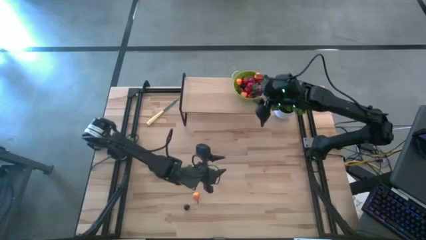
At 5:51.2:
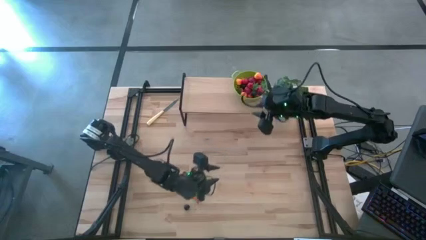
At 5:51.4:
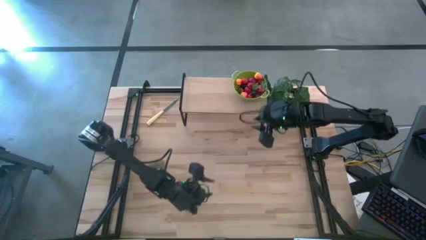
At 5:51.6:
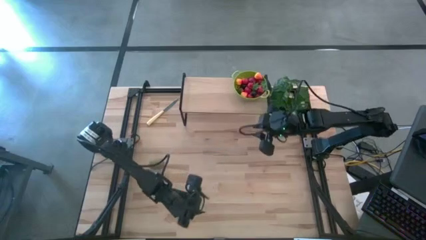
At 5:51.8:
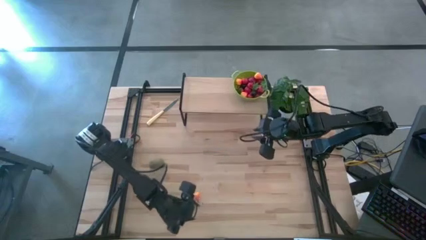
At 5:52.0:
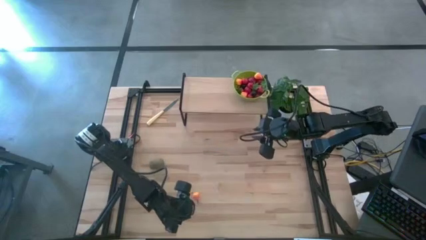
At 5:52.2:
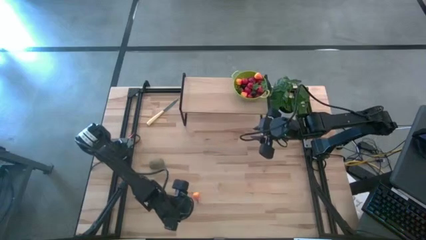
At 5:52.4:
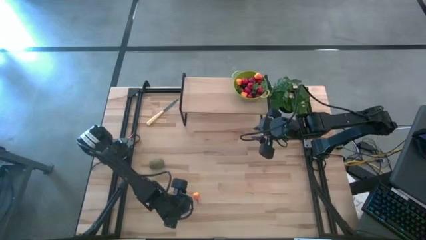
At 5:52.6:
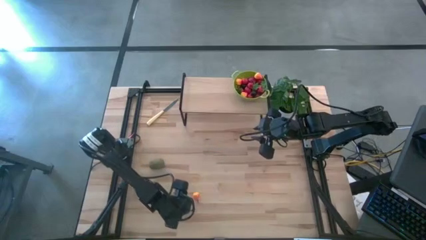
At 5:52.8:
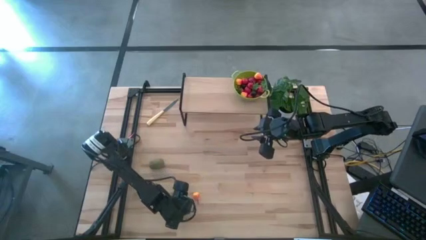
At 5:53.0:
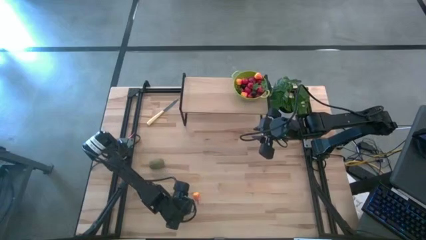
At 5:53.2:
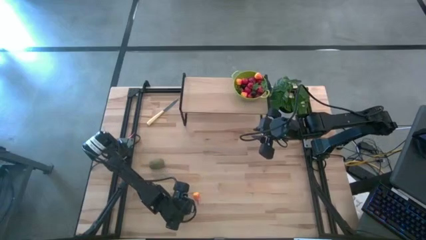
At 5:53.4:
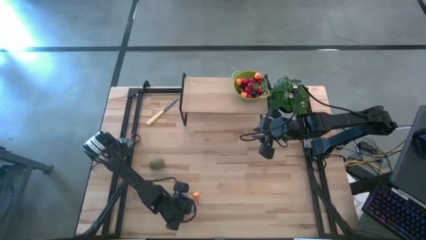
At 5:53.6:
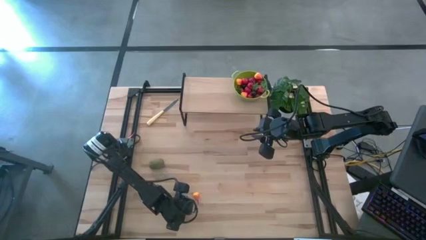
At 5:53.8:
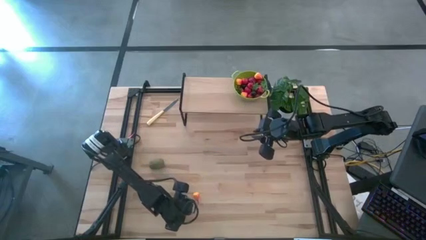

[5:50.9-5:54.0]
Task: Build produce basket
Put the black cherry into the green basket

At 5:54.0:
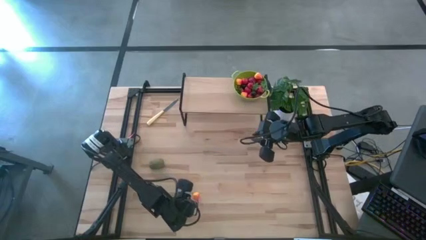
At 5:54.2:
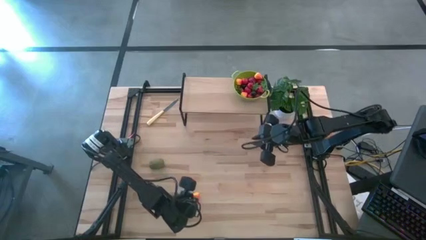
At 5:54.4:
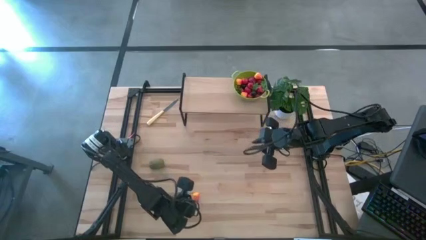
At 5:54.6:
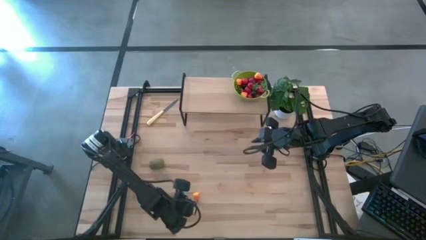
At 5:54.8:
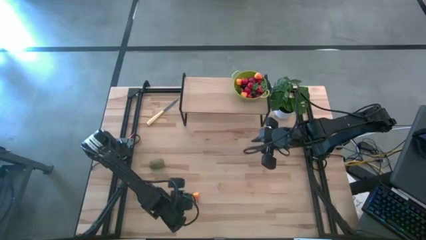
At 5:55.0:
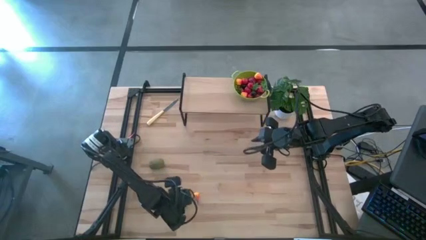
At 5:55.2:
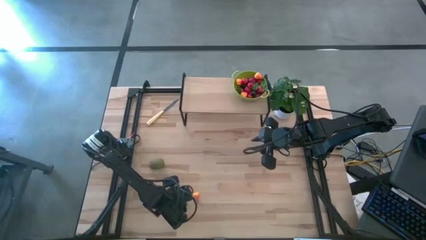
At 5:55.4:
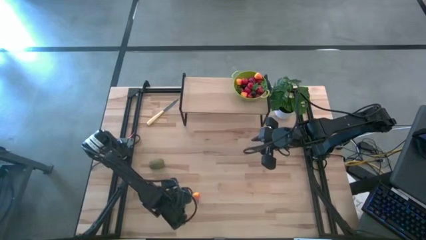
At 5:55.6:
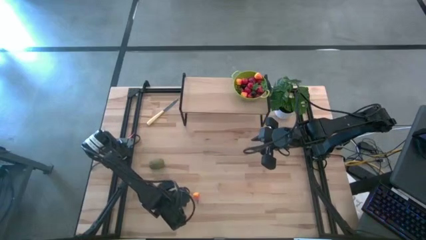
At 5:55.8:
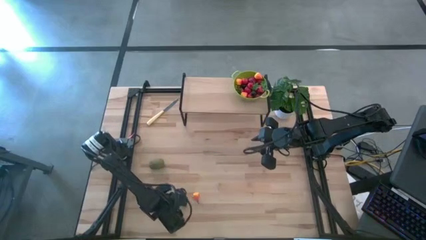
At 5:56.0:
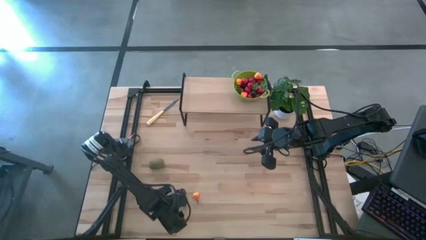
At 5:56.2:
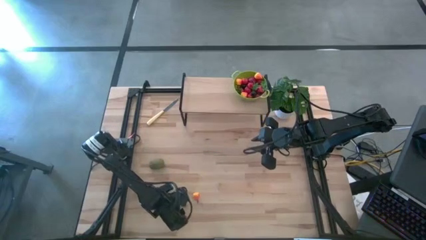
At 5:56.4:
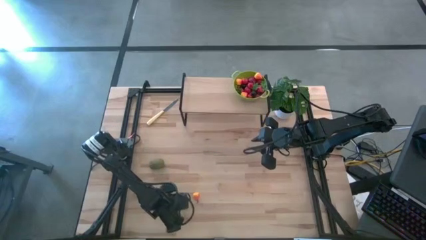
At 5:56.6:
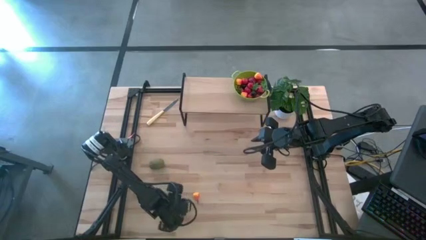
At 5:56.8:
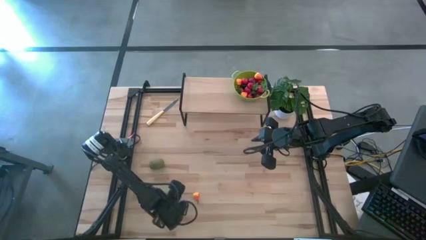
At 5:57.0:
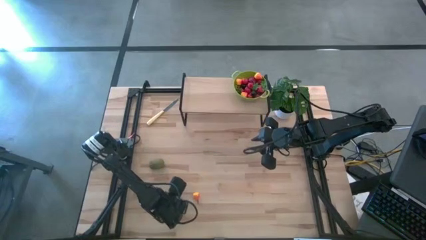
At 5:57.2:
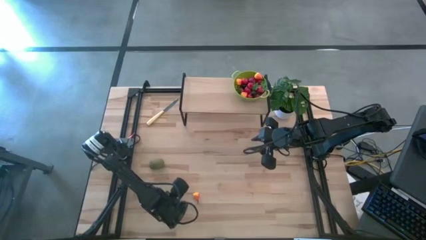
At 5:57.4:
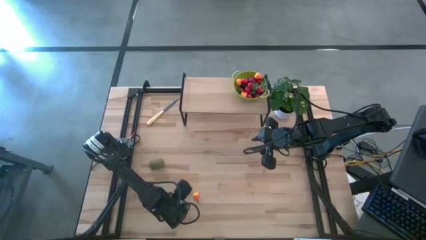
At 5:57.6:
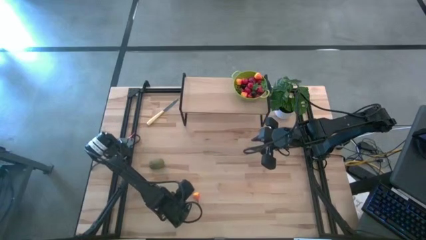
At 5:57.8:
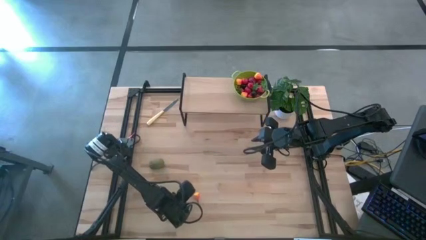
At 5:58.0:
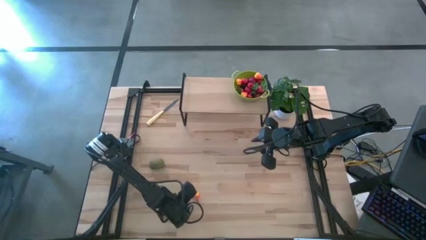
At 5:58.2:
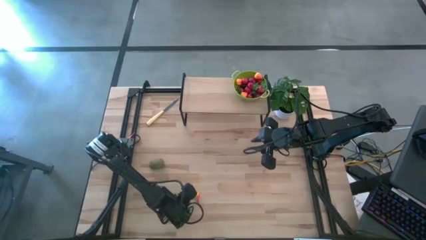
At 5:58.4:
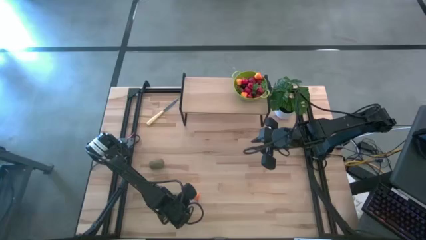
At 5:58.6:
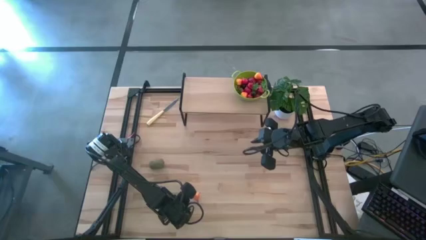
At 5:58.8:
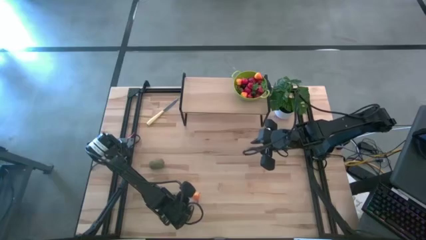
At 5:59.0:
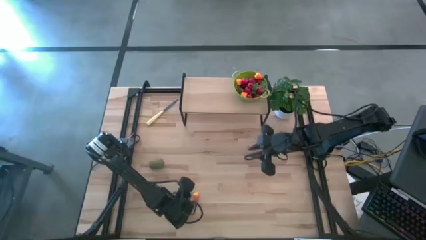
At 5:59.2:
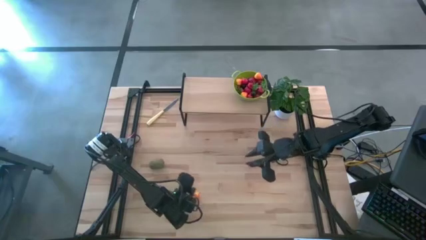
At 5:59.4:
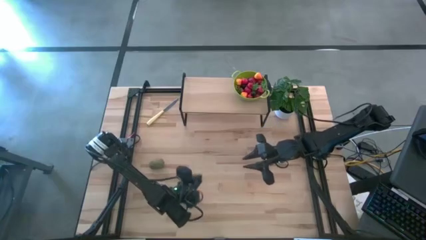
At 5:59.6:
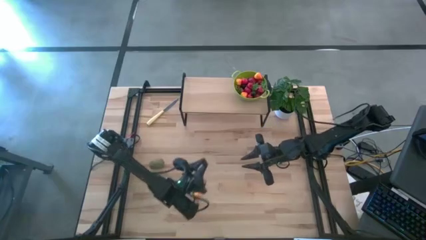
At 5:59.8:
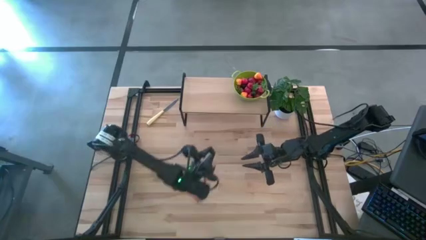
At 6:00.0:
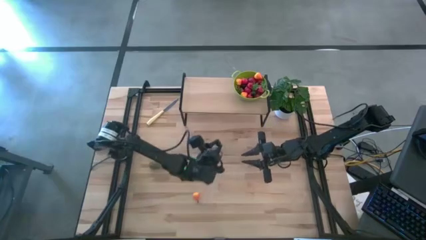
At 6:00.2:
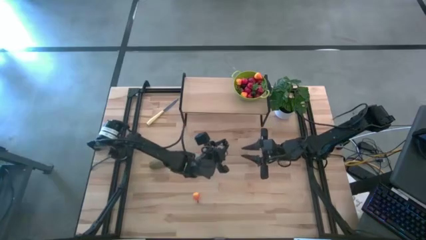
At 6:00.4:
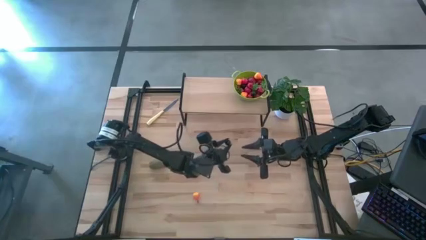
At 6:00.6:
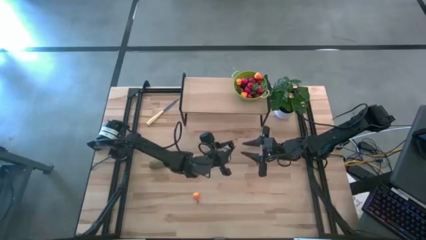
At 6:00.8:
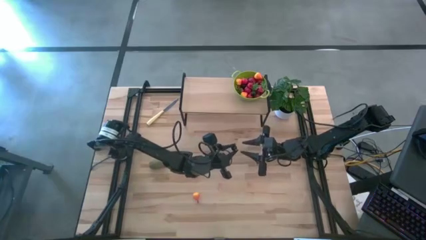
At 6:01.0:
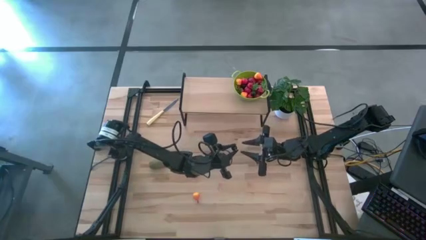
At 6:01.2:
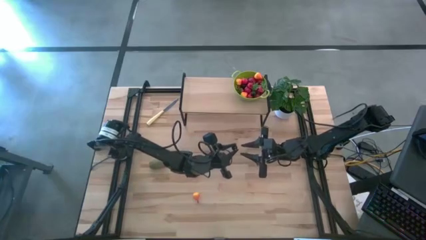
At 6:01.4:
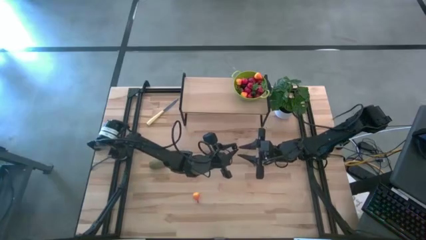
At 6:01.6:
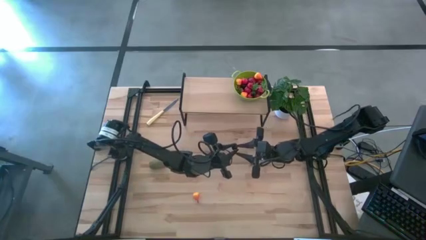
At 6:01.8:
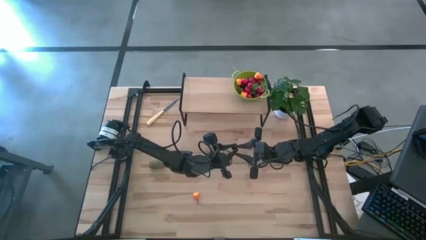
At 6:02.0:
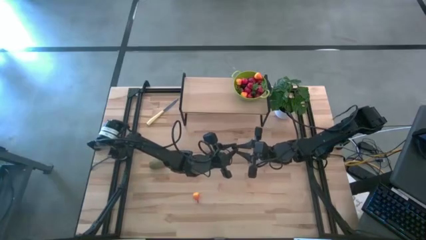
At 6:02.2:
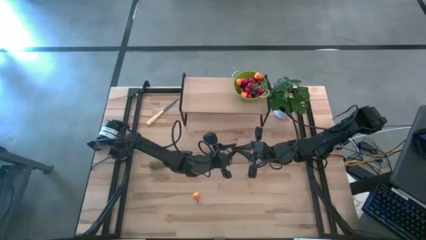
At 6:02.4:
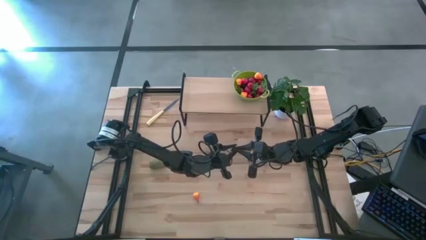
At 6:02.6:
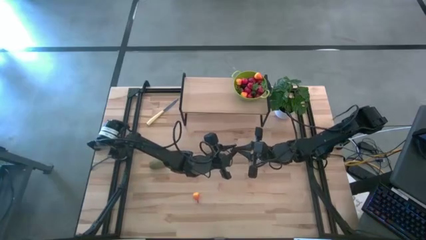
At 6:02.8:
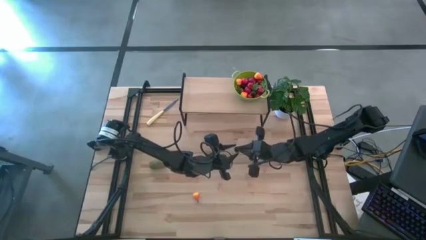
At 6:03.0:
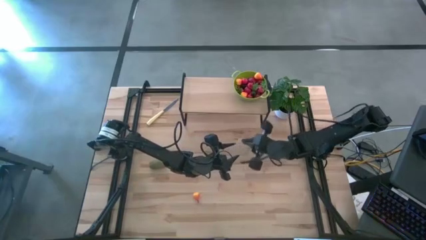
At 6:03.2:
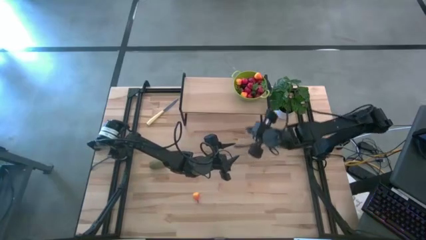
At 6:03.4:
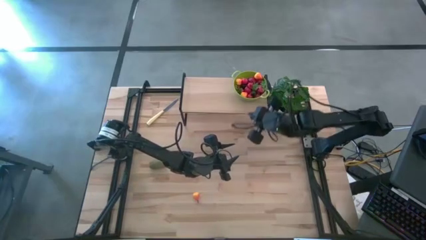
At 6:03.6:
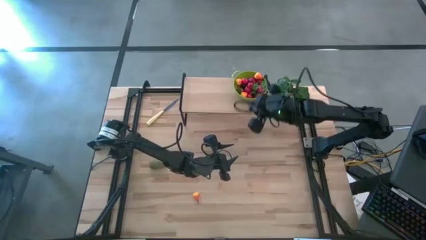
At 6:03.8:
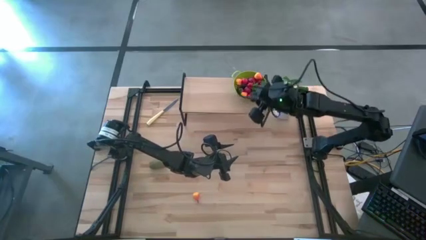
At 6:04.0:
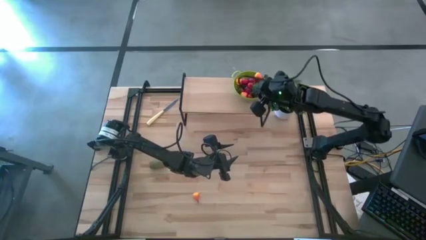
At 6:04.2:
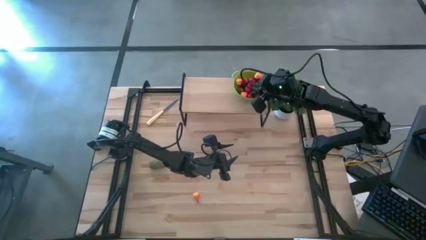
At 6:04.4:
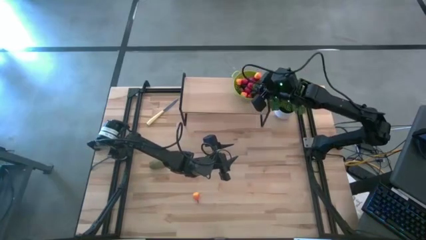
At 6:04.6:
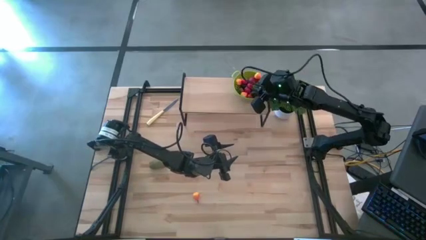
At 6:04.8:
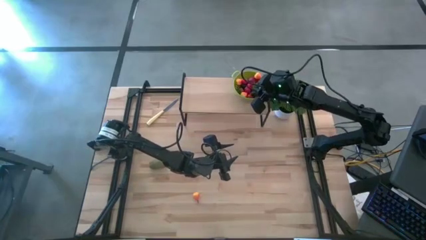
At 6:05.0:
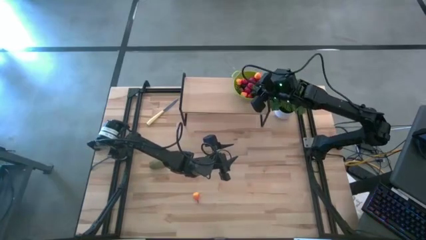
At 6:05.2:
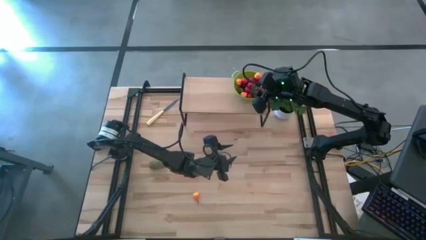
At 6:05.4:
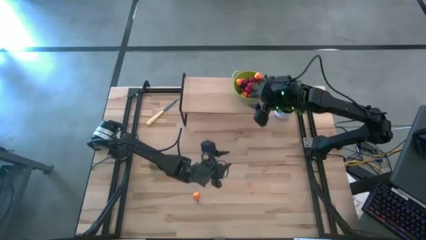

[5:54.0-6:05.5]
Put the black cherry into the green basket
